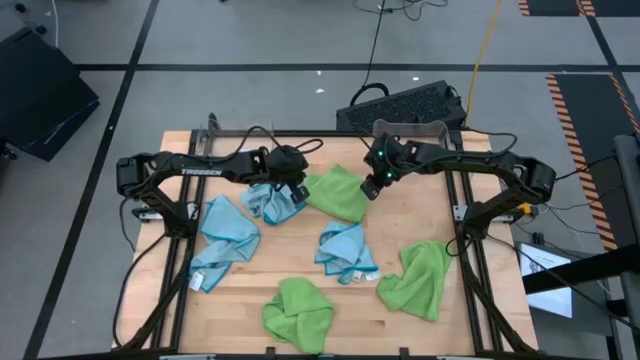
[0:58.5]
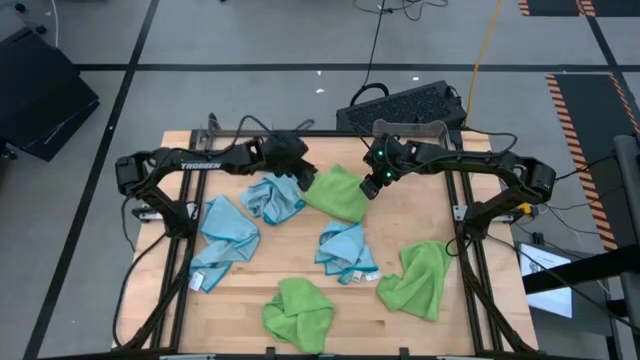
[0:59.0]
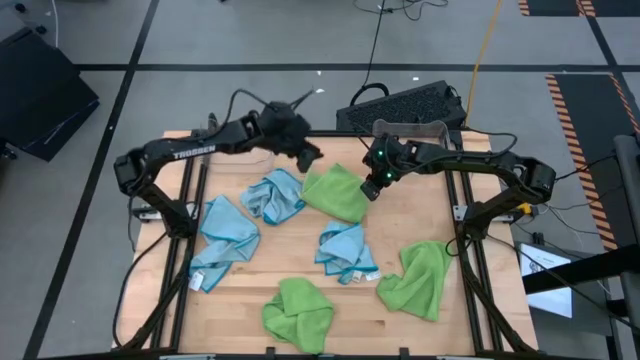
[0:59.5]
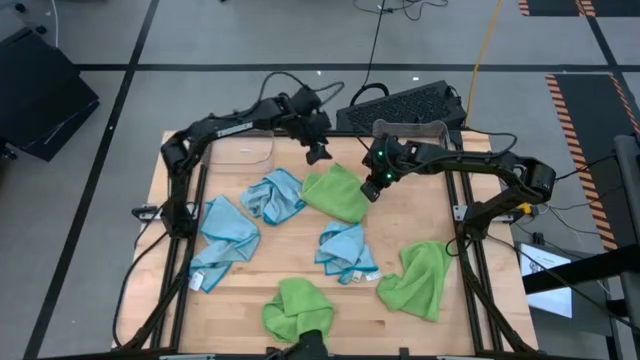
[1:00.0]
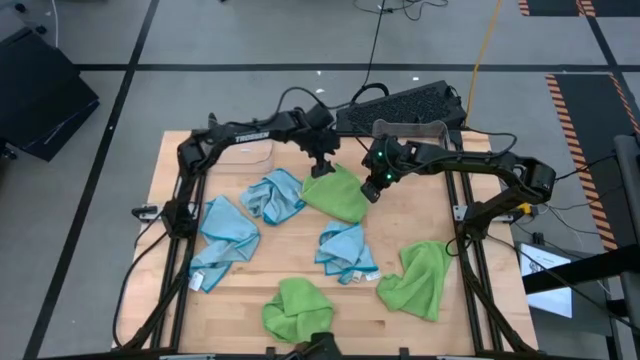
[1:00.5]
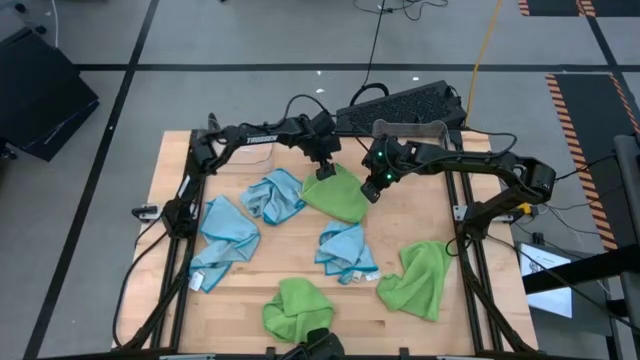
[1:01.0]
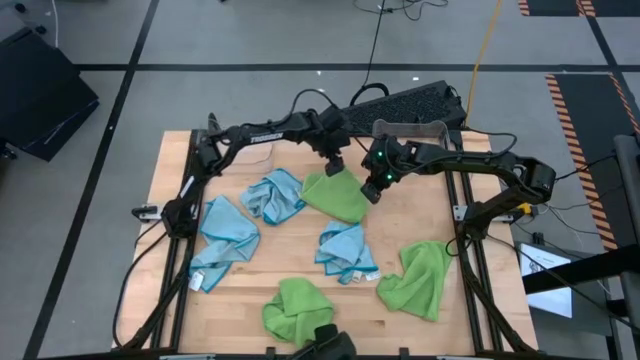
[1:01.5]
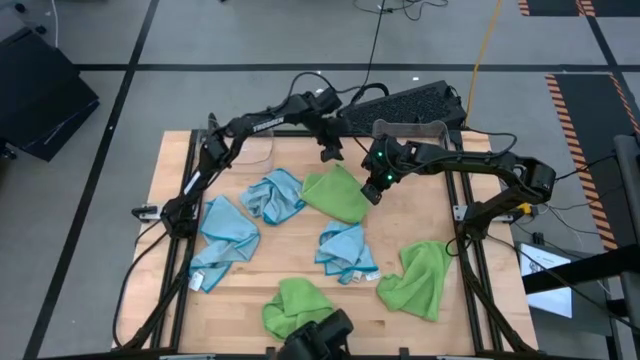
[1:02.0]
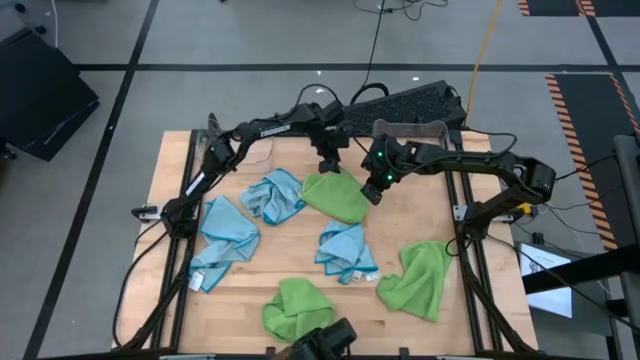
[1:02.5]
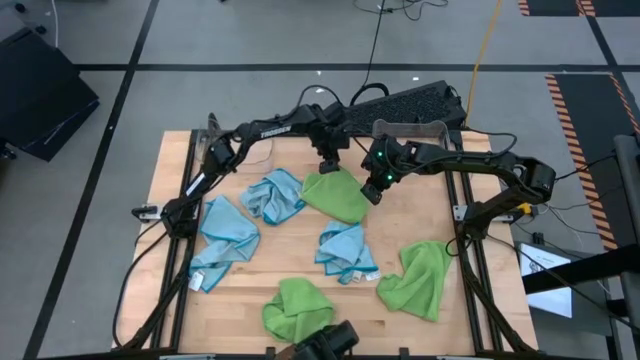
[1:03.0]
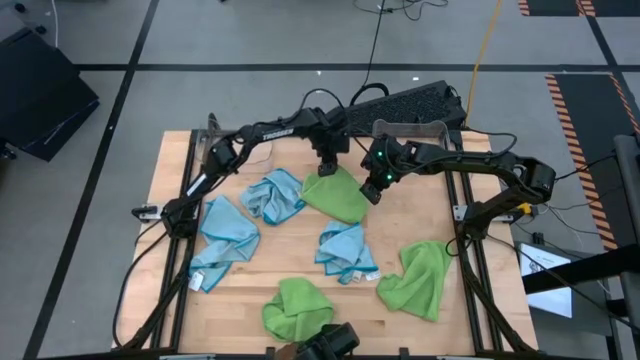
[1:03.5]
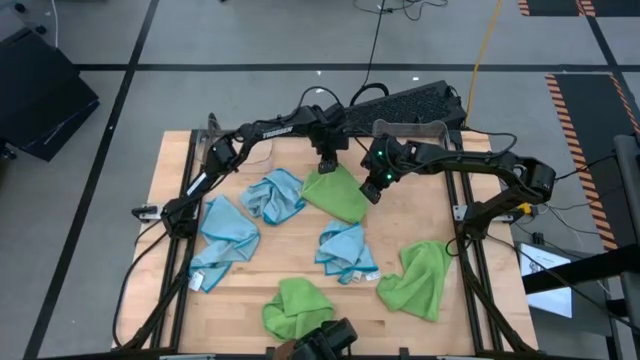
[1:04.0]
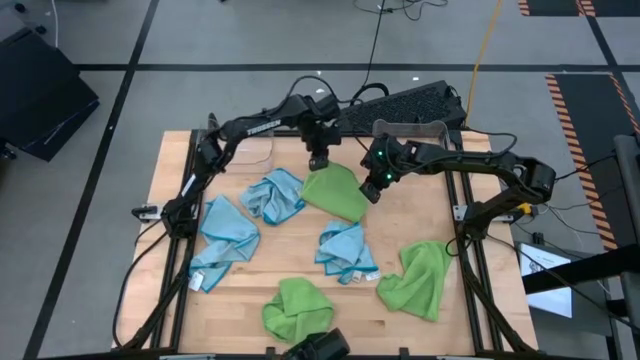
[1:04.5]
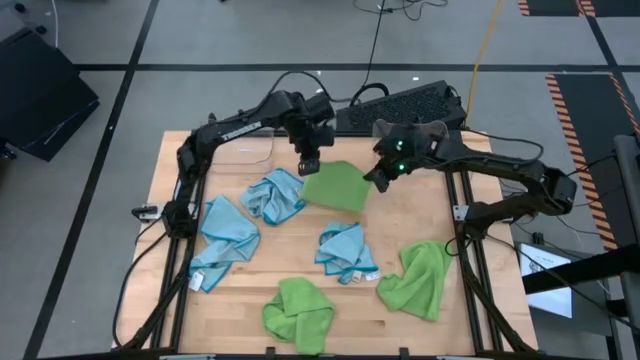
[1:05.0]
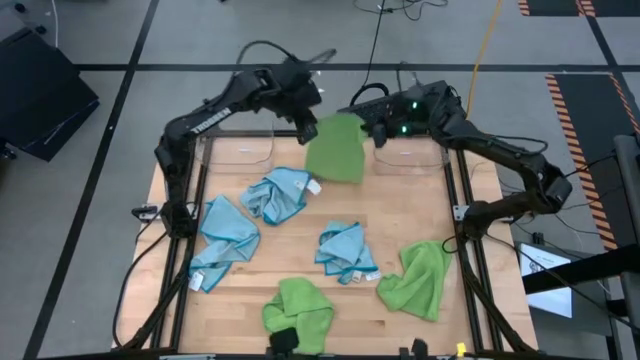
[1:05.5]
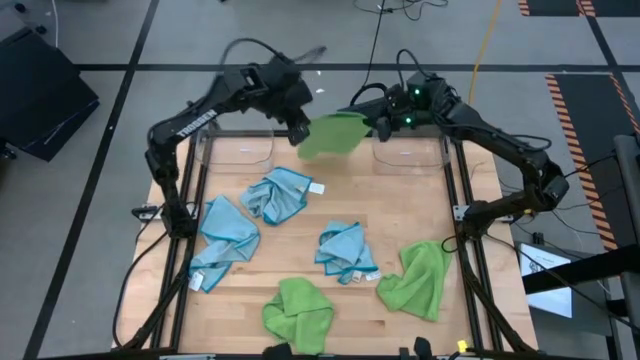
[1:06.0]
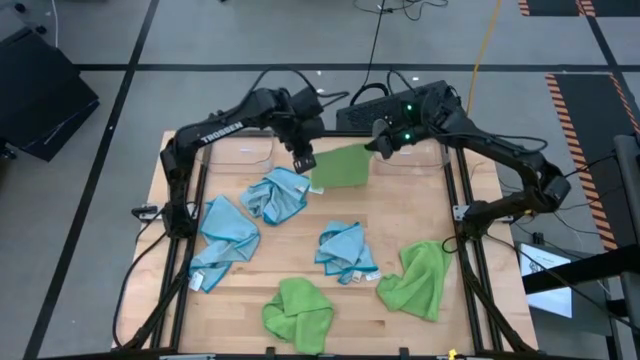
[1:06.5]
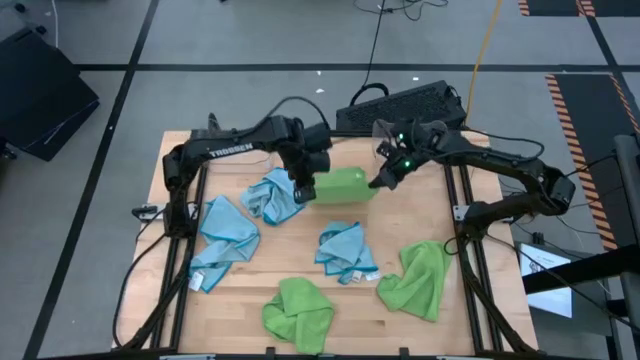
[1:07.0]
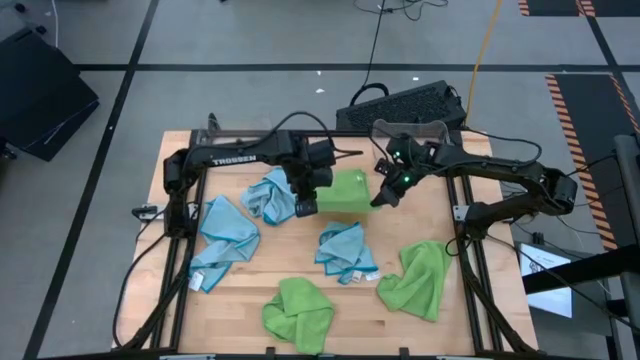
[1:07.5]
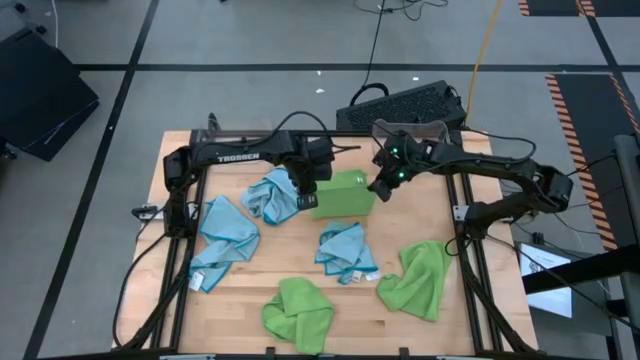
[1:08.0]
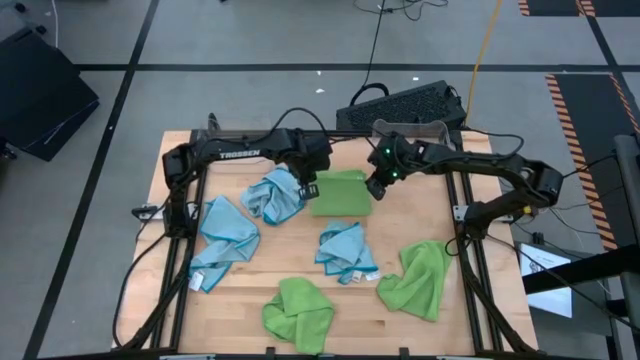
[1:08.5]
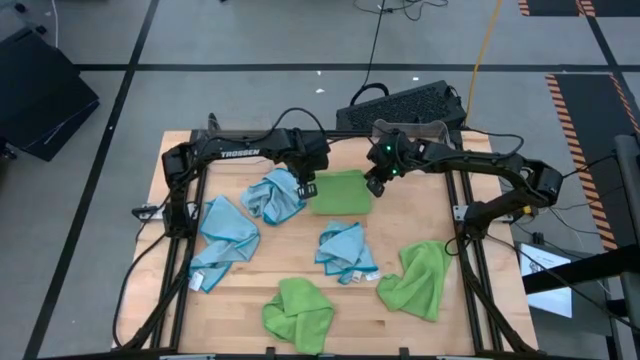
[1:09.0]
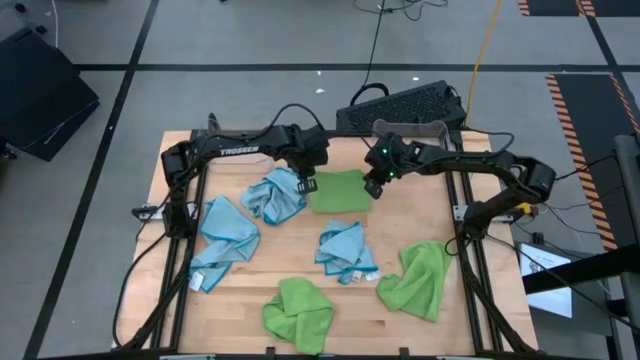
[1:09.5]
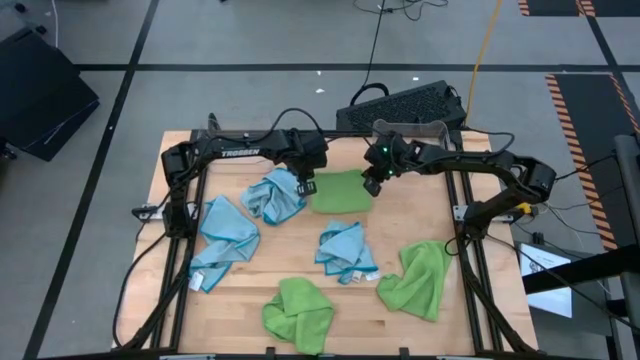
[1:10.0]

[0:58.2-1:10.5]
Task: Sort microfiber towel by color & place in baskets
Fold the top green towel

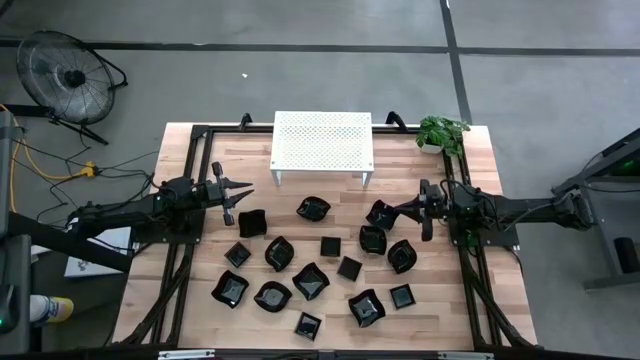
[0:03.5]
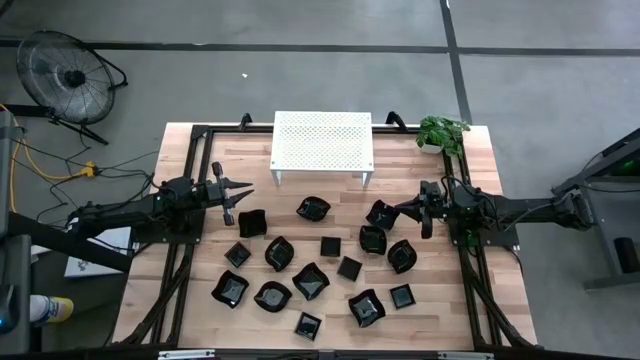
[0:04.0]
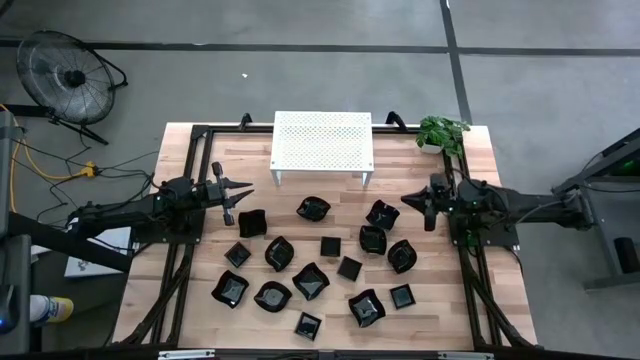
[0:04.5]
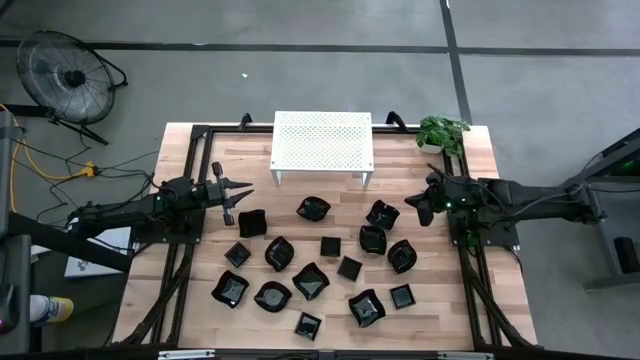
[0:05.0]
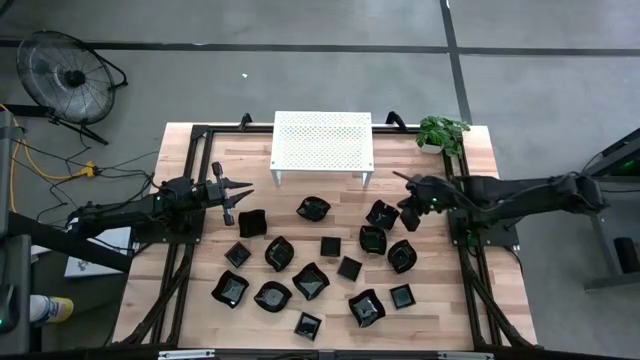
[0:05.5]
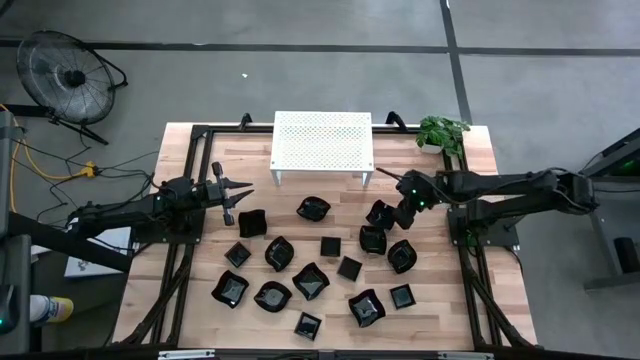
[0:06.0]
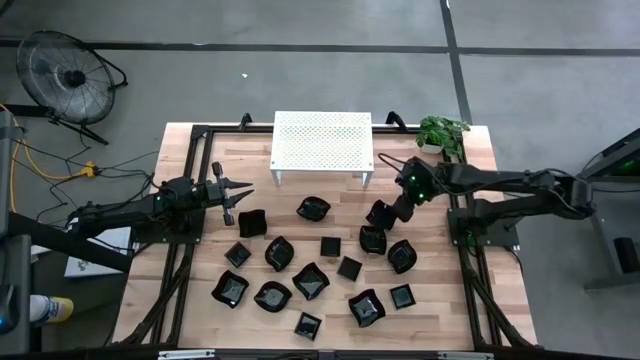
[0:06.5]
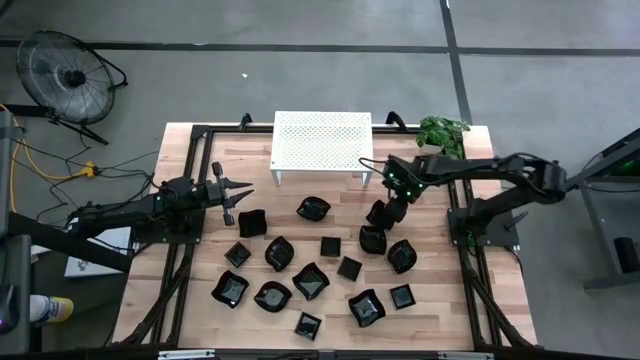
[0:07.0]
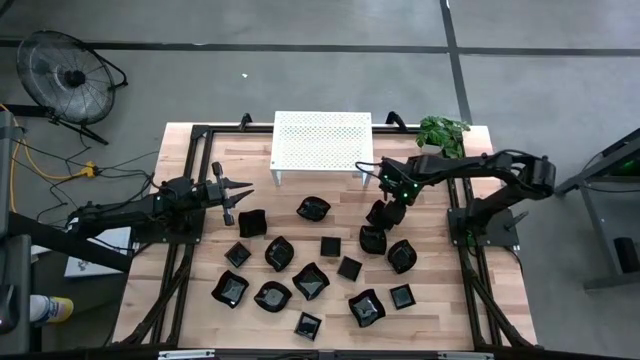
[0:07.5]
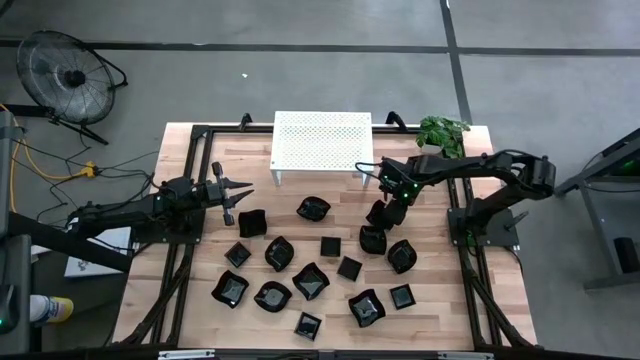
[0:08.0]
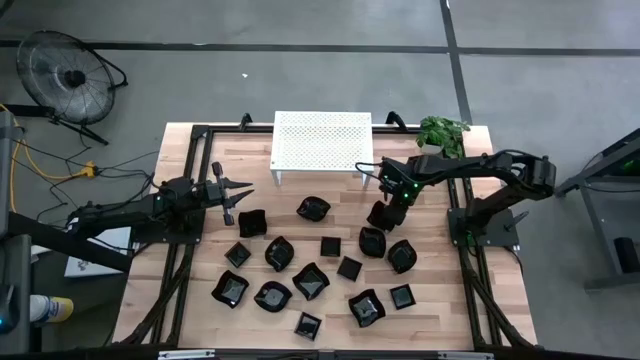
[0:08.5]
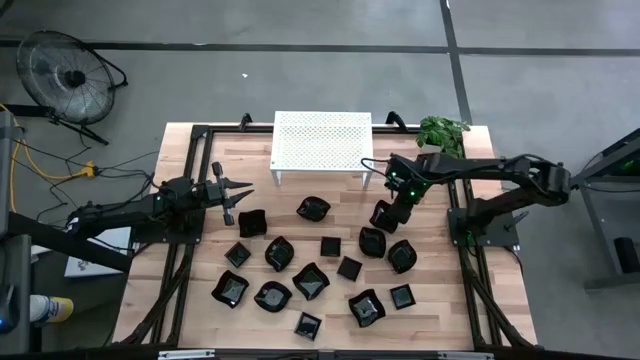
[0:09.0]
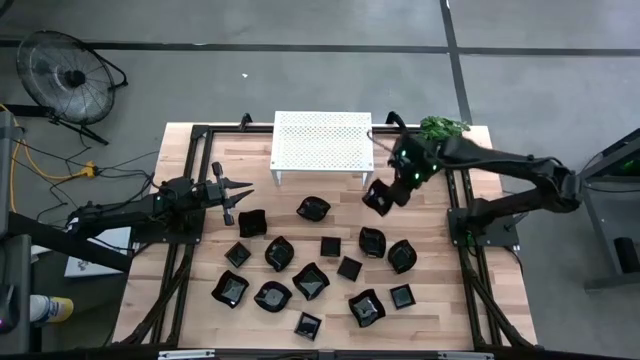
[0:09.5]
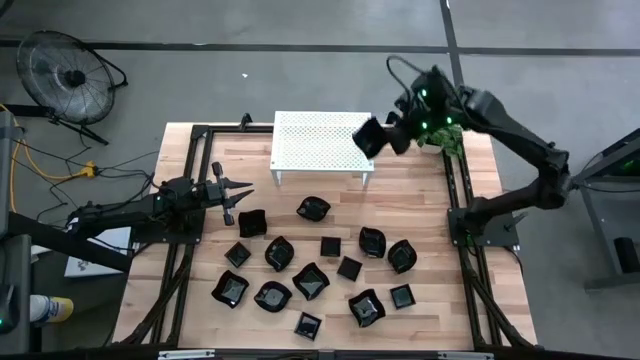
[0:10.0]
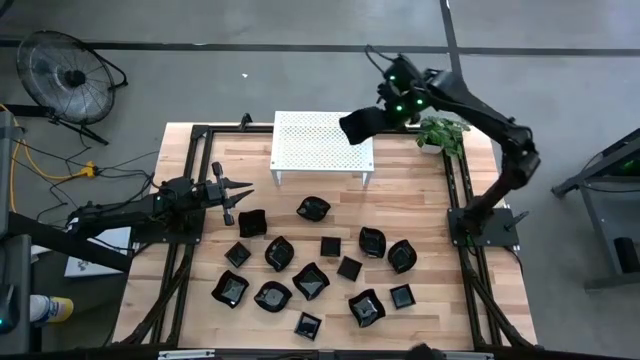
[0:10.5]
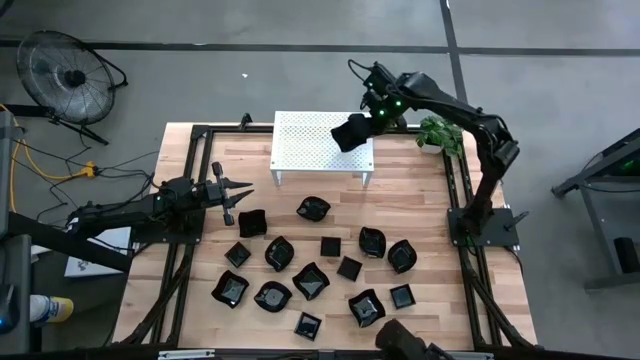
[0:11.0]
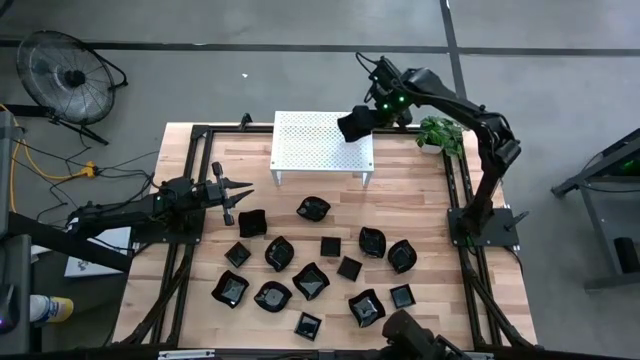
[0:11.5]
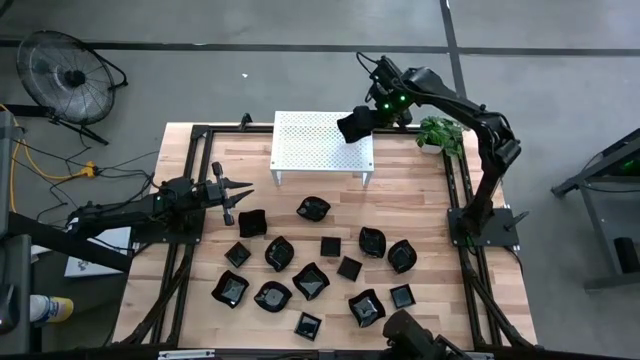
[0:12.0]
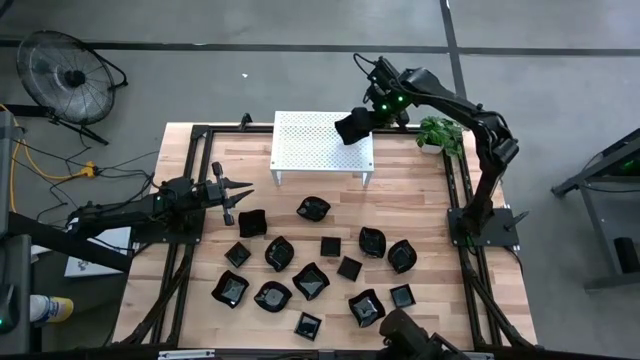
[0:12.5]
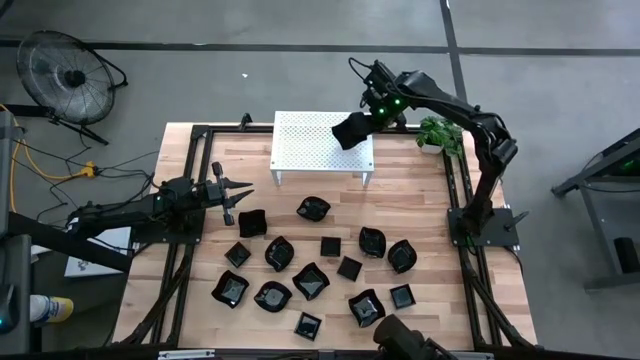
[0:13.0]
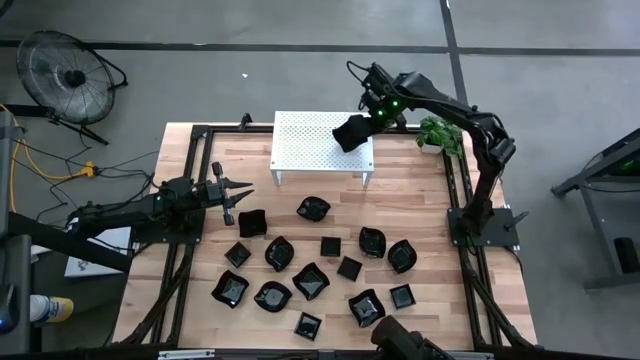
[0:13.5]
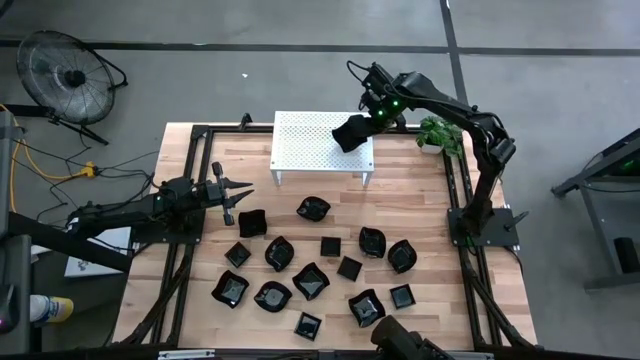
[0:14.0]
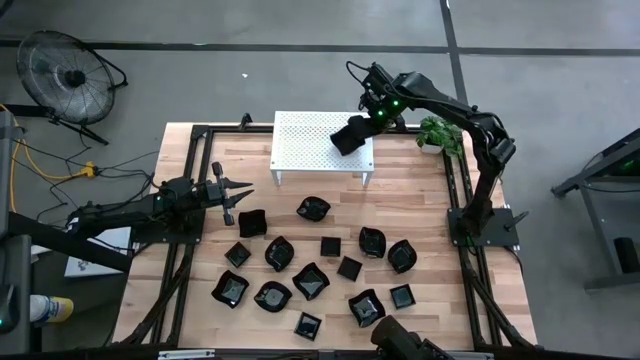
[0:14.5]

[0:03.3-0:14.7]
Task: Pick & Place Mini shaped plates
Put the black distorted square plate on the shelf
